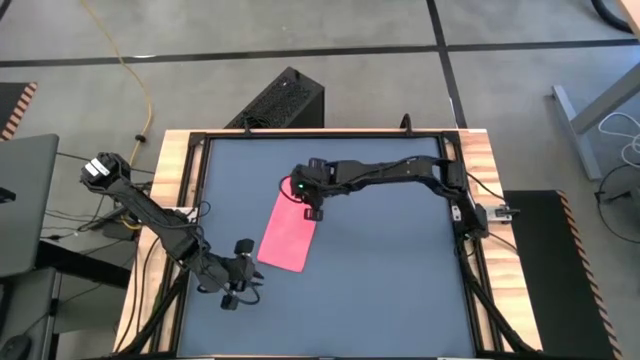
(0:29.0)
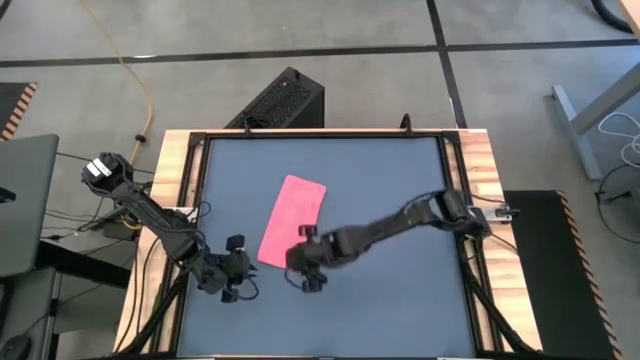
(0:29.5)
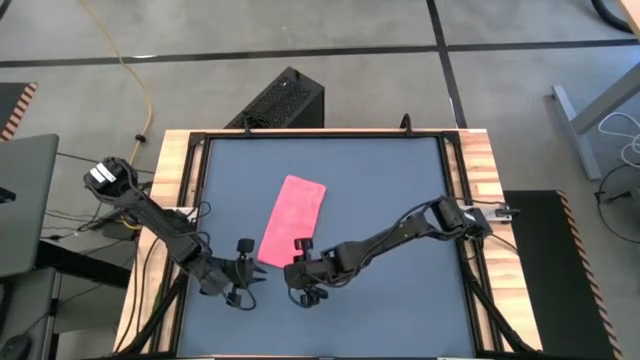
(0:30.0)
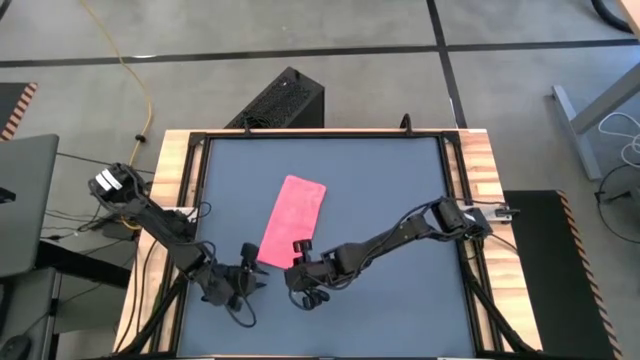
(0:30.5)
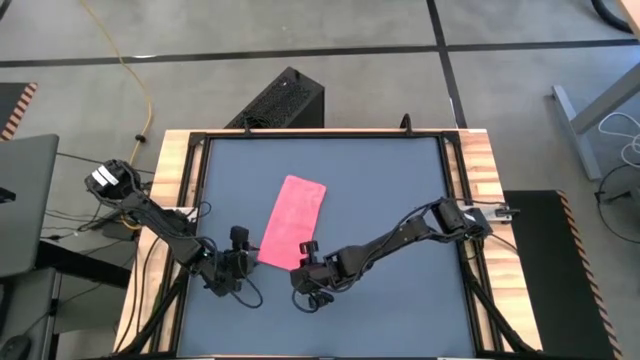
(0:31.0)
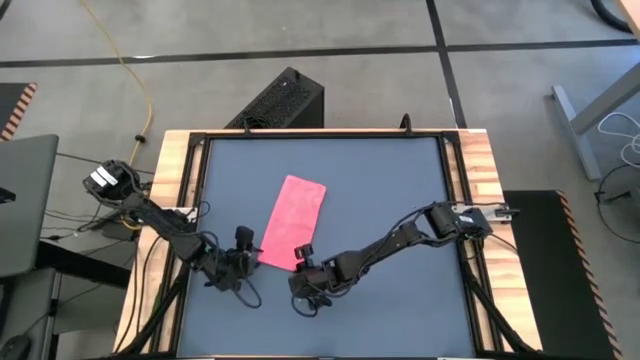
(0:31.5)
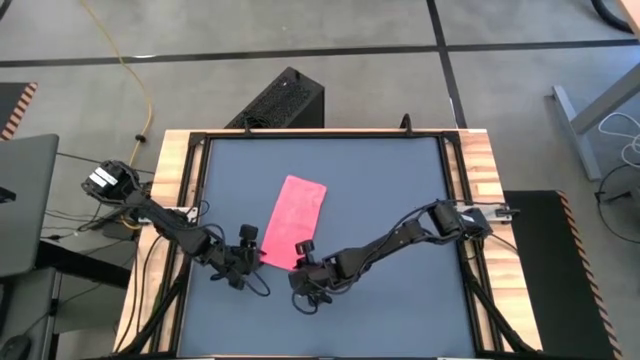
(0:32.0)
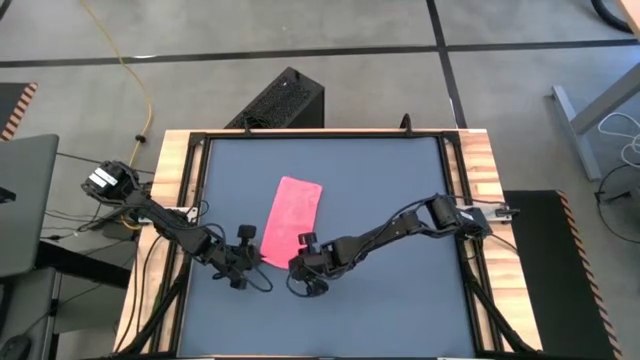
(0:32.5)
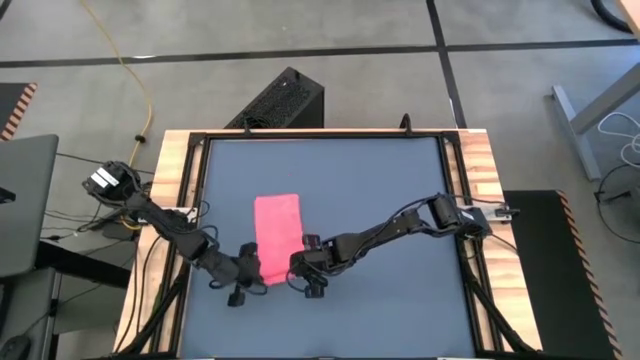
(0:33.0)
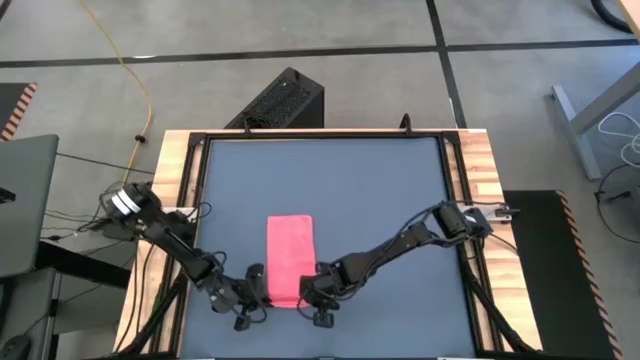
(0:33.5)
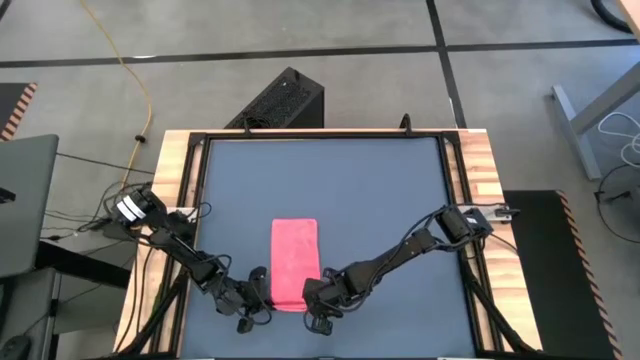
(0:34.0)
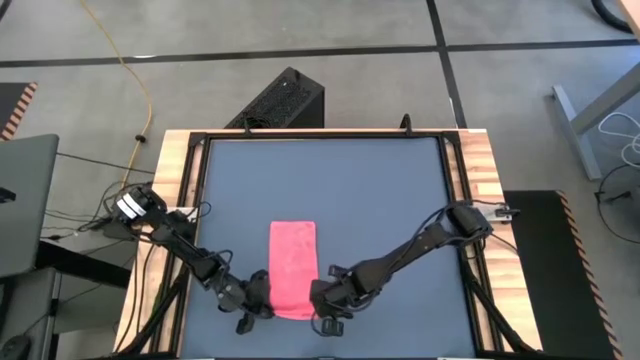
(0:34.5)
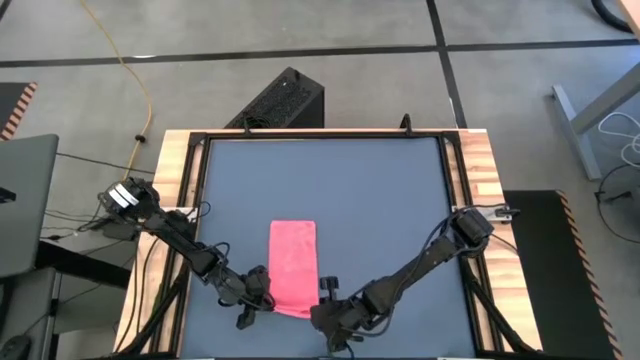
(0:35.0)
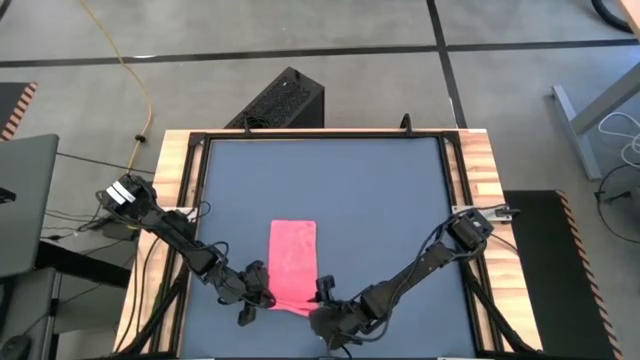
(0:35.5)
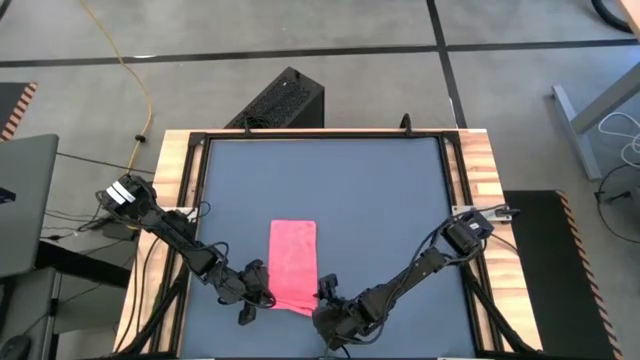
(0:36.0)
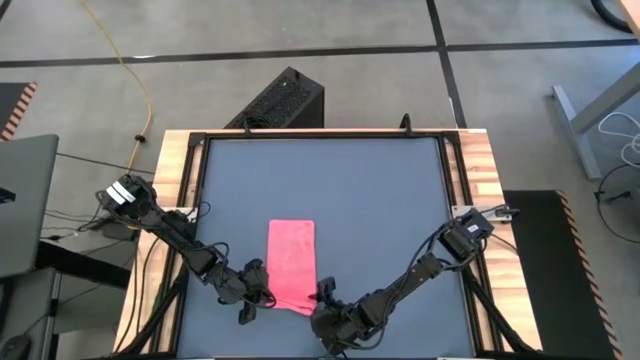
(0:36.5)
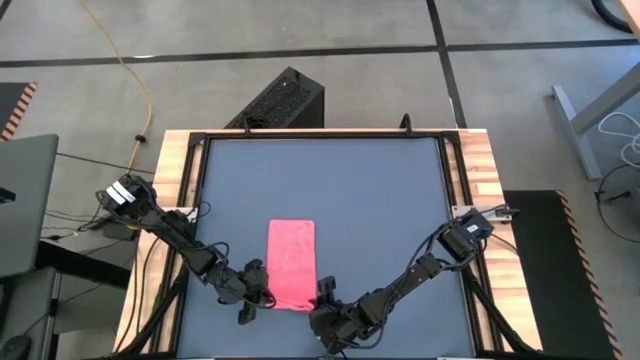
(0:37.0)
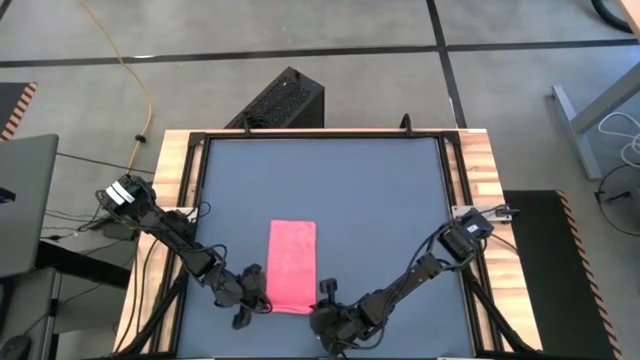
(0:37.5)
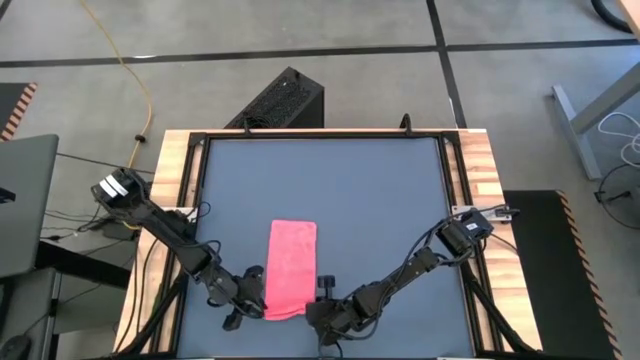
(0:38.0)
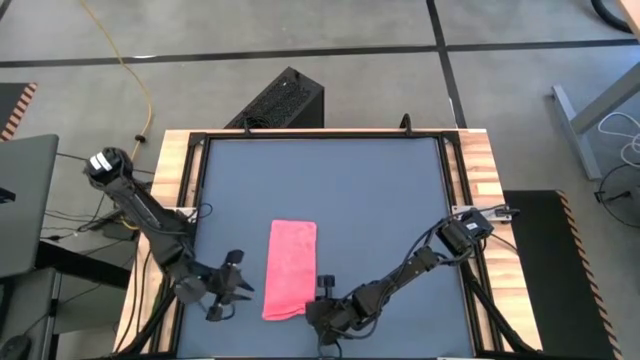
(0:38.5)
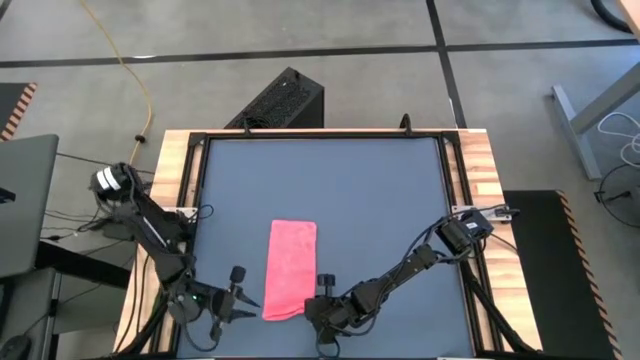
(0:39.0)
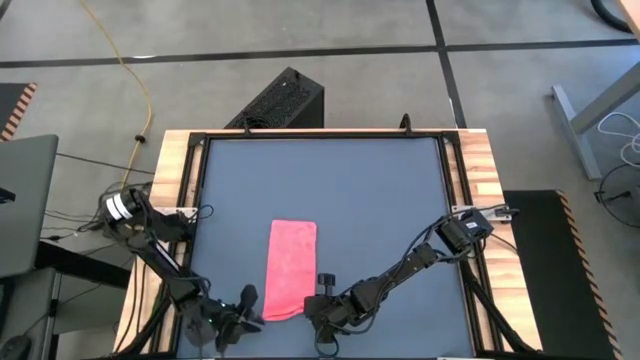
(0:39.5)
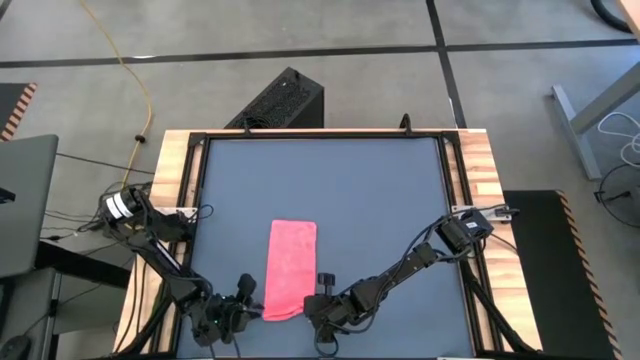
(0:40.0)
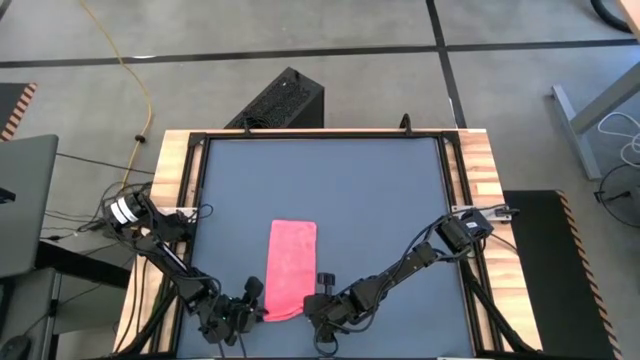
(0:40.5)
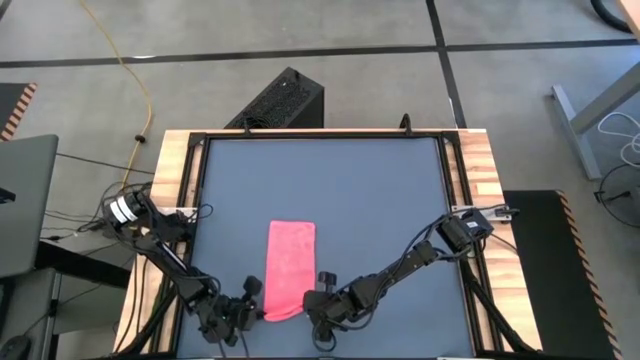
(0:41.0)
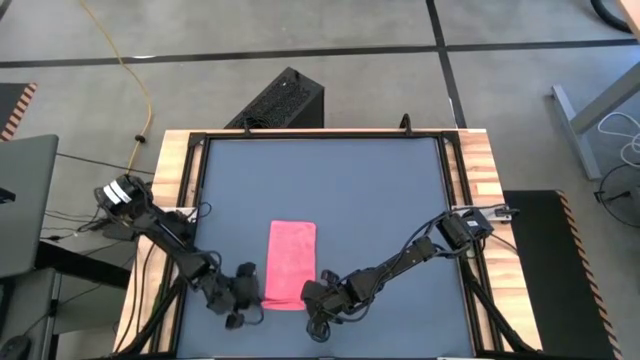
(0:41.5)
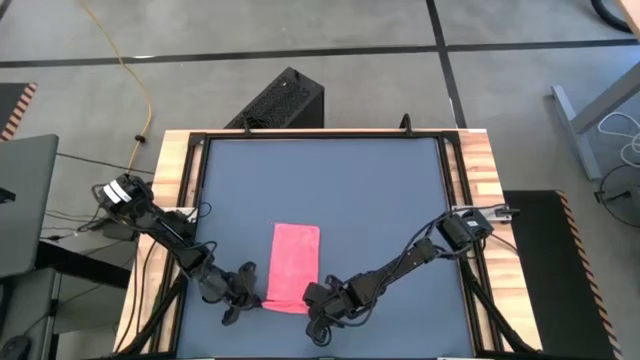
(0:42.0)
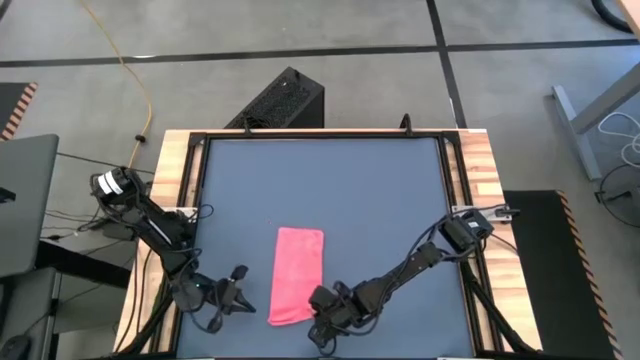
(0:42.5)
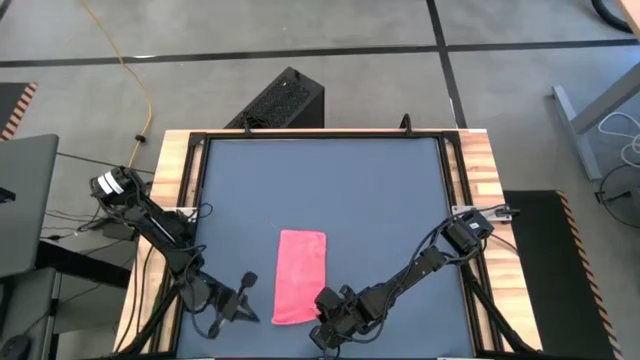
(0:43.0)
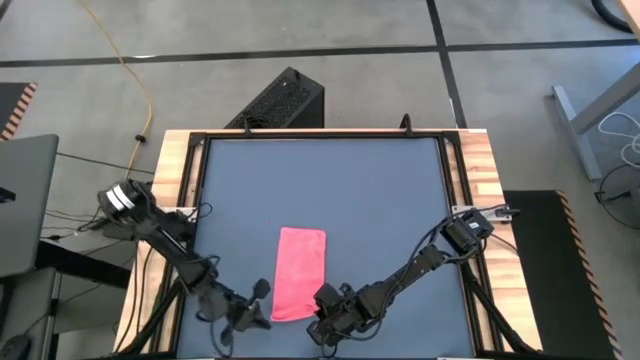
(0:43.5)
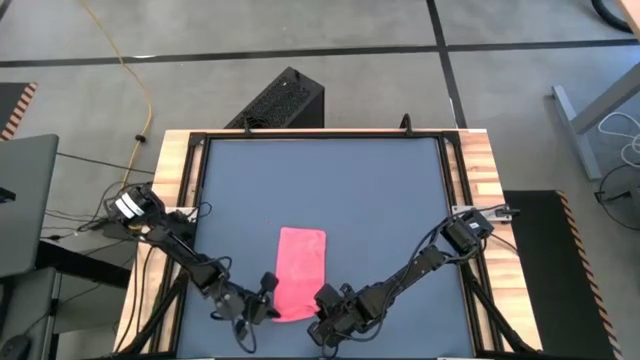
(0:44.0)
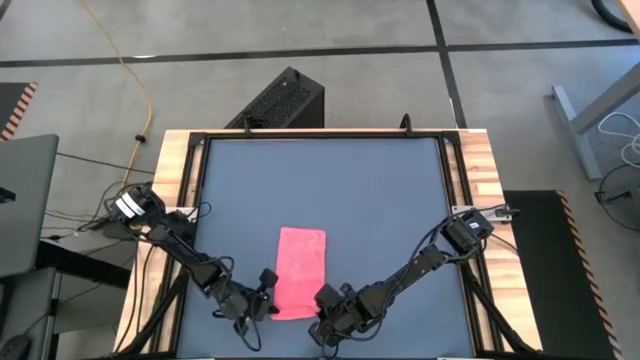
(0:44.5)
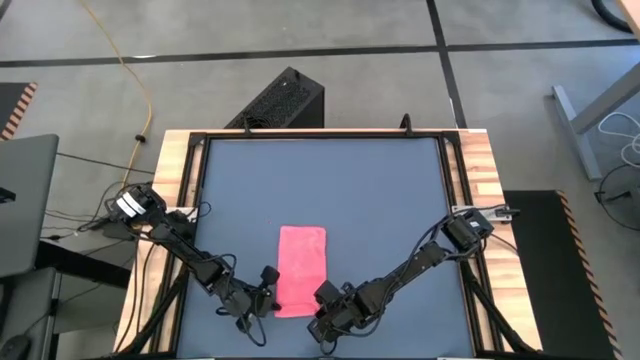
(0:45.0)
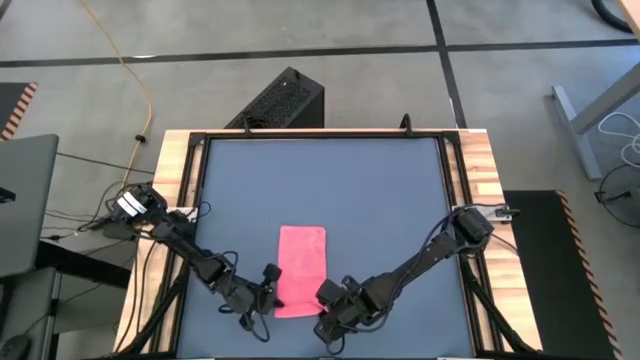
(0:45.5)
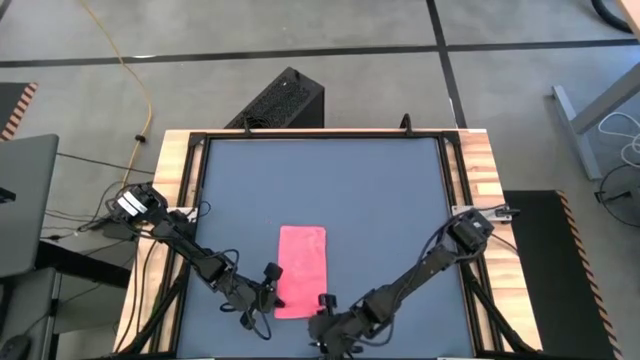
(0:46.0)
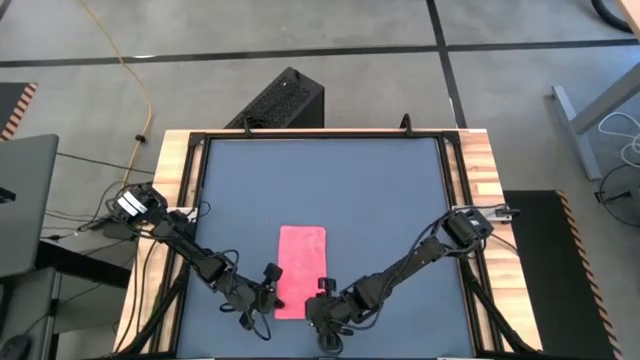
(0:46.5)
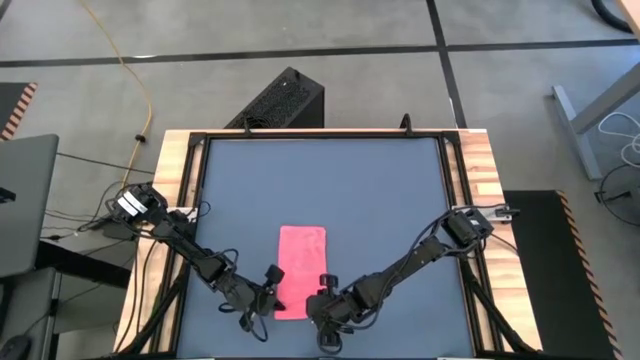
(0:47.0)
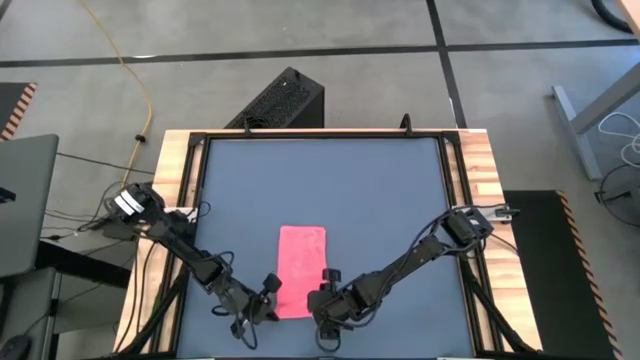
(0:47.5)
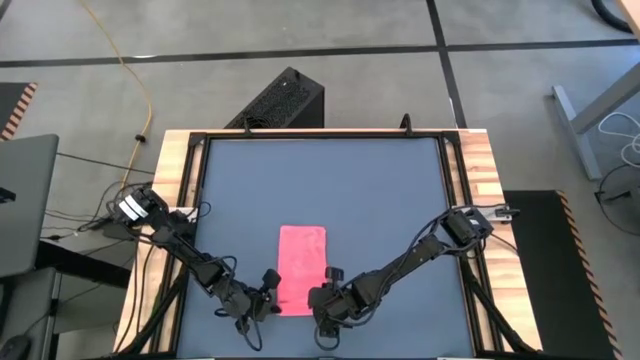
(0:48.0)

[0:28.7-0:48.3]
Task: Roll towel
Roll the pink towel

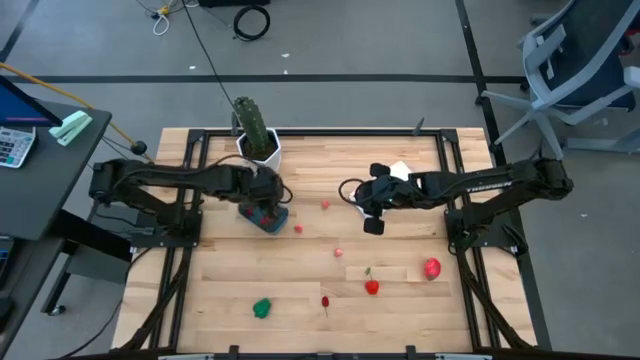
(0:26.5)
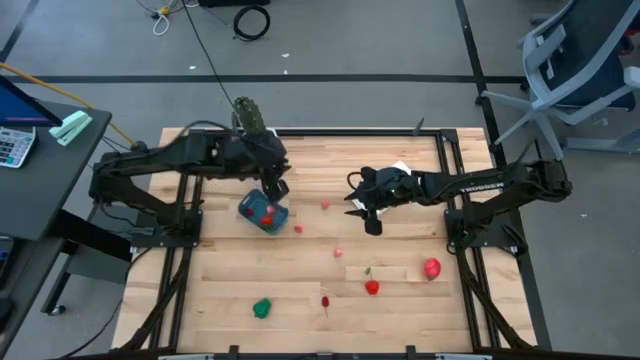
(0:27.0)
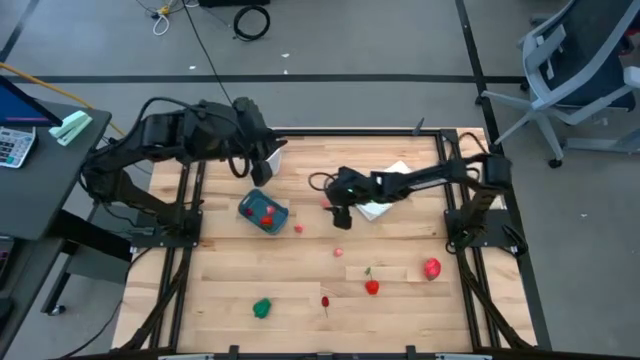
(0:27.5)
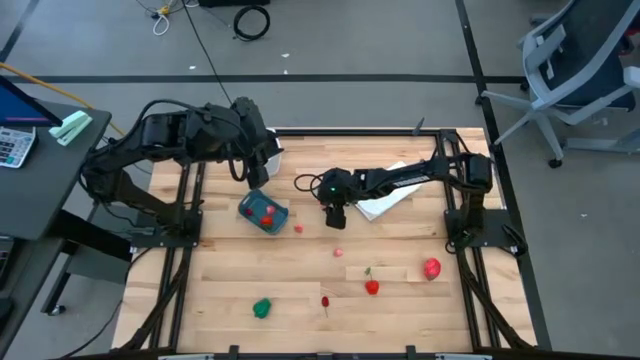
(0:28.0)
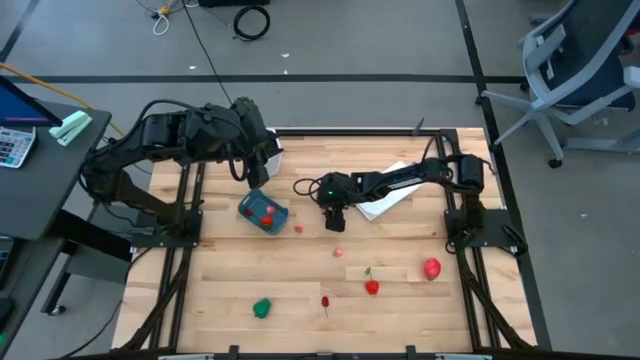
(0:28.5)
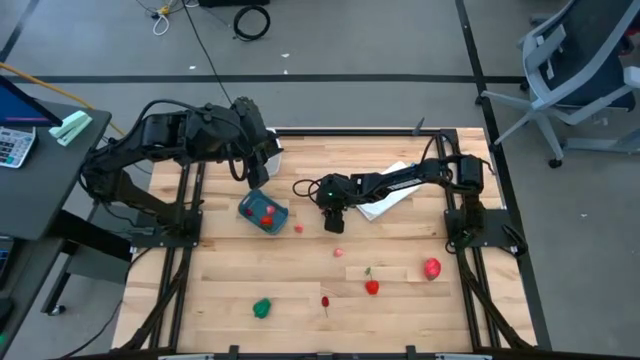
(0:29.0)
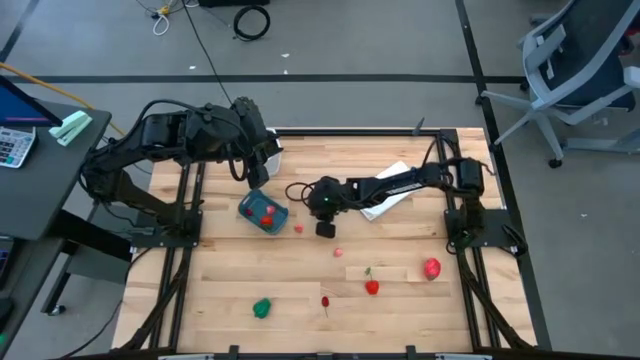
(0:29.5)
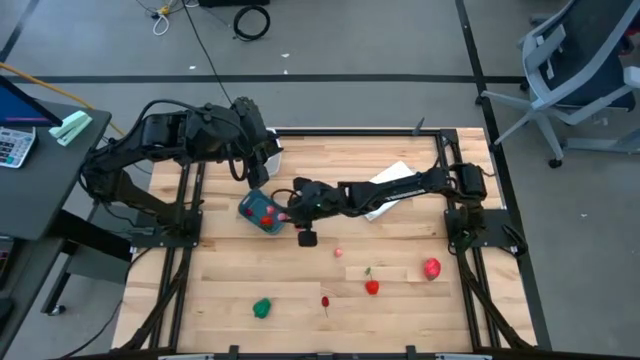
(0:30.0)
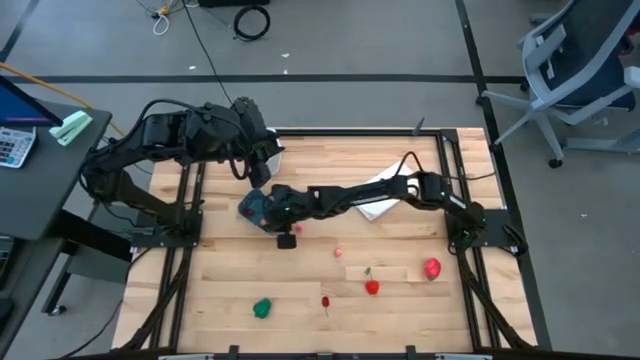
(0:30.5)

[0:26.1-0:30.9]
Task: Pick and placing Produce into tupperware
Put the top right pink peach into the blue bin
